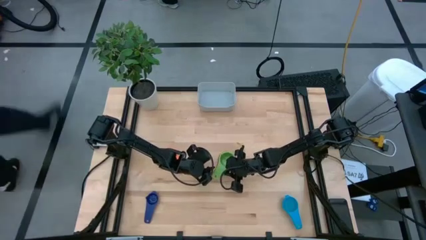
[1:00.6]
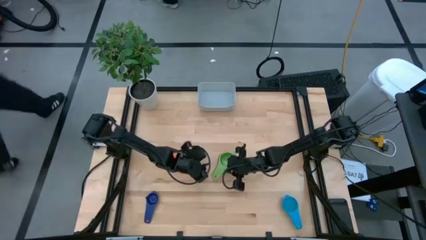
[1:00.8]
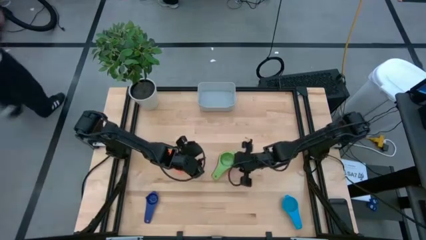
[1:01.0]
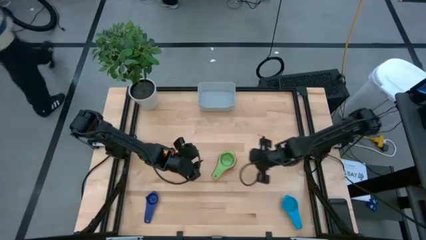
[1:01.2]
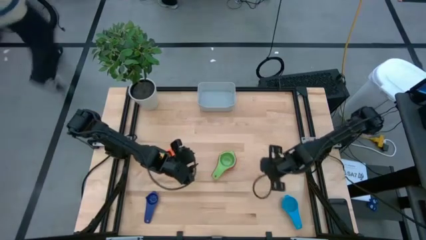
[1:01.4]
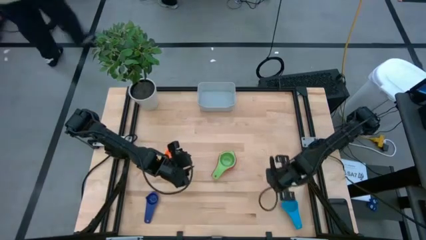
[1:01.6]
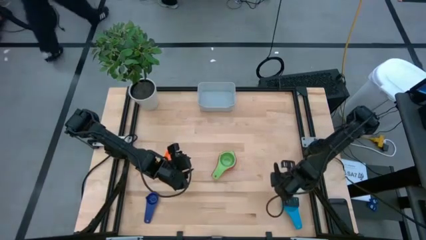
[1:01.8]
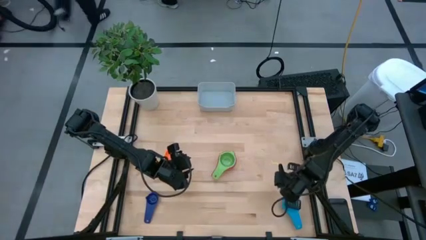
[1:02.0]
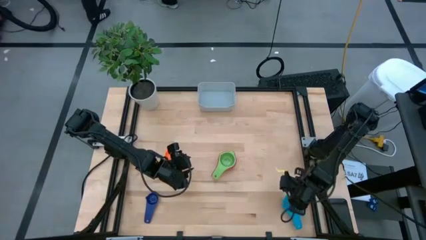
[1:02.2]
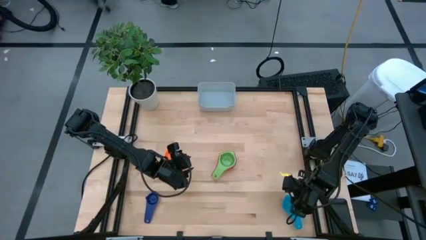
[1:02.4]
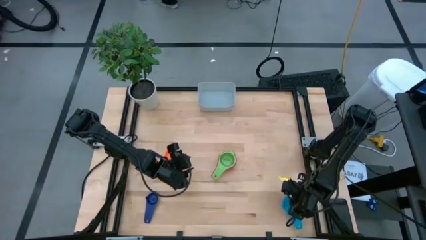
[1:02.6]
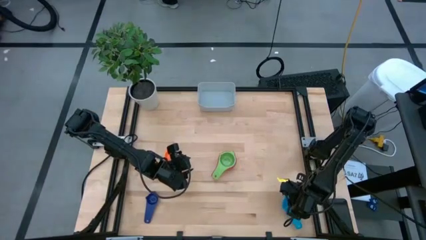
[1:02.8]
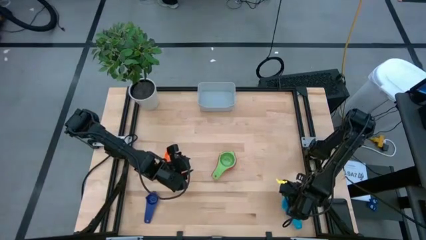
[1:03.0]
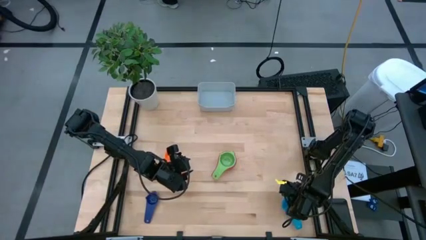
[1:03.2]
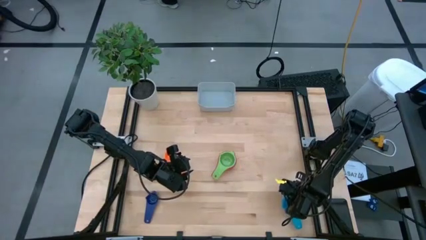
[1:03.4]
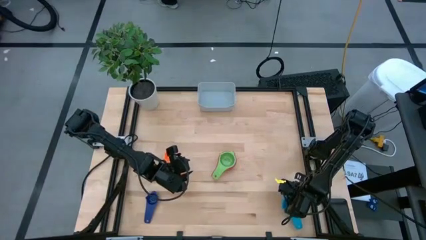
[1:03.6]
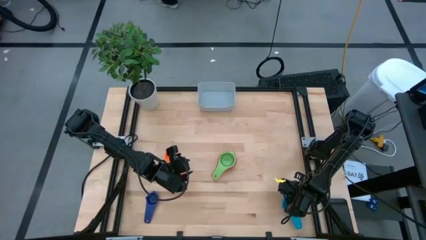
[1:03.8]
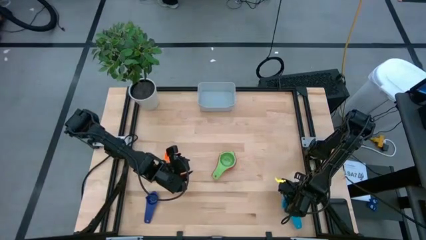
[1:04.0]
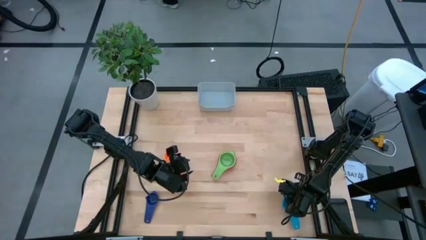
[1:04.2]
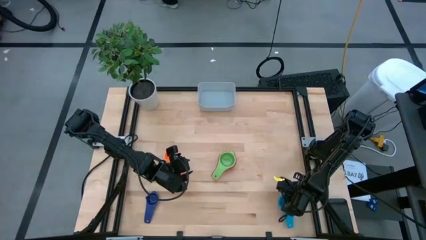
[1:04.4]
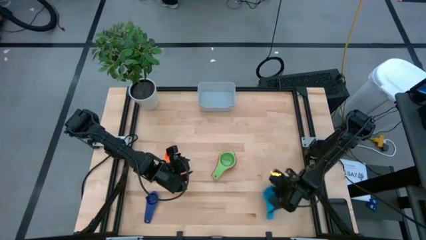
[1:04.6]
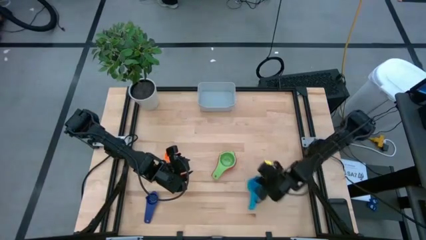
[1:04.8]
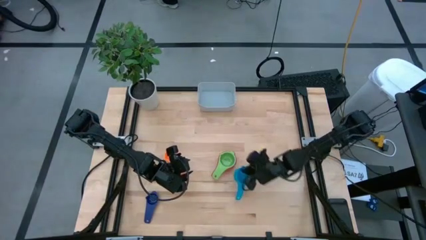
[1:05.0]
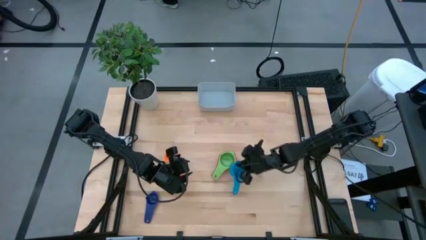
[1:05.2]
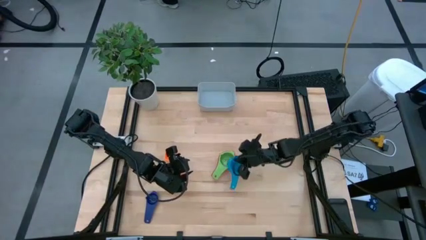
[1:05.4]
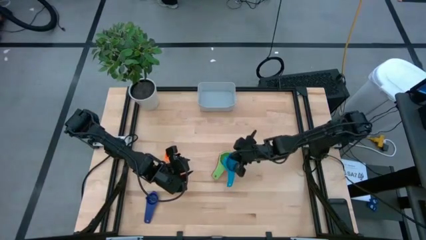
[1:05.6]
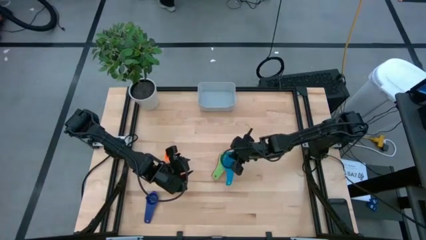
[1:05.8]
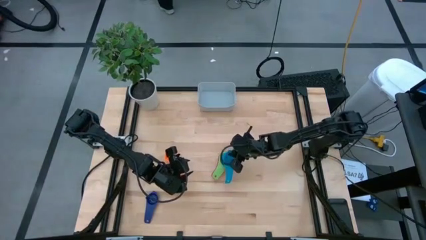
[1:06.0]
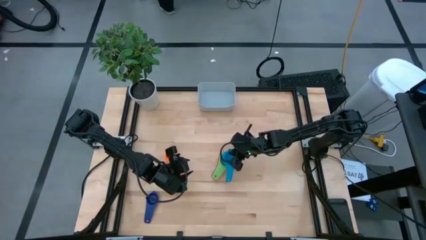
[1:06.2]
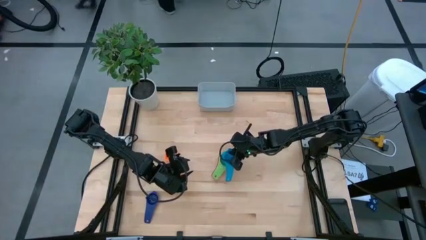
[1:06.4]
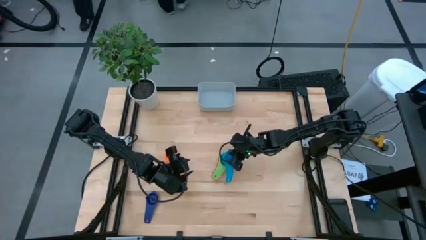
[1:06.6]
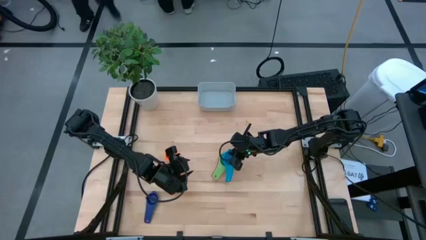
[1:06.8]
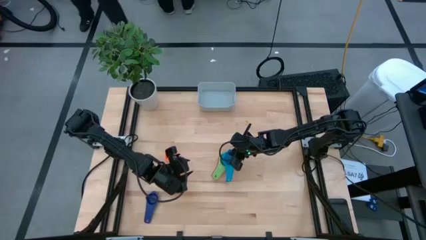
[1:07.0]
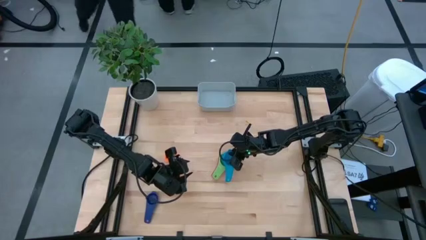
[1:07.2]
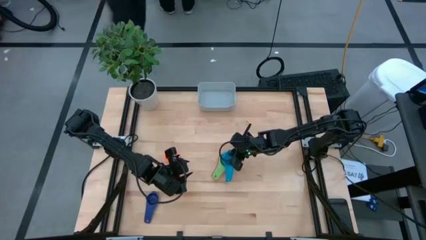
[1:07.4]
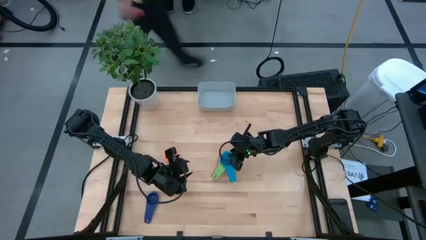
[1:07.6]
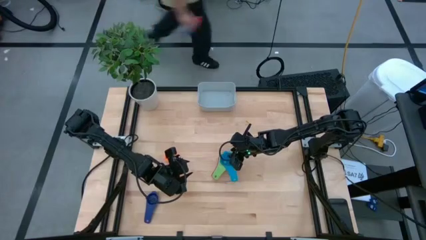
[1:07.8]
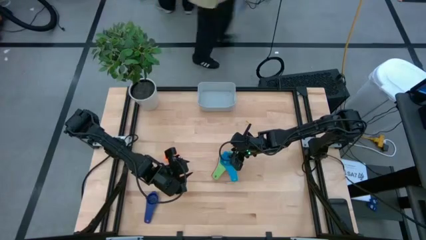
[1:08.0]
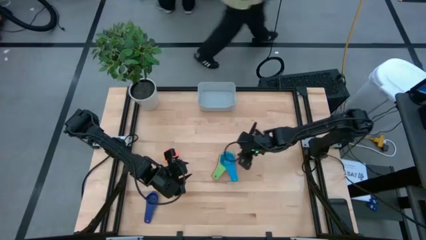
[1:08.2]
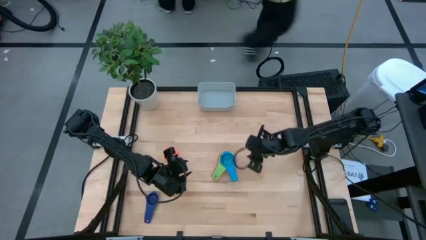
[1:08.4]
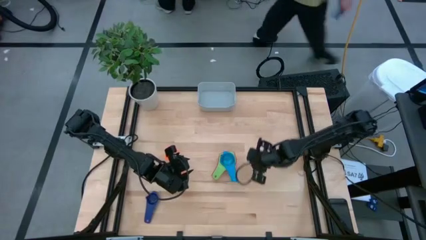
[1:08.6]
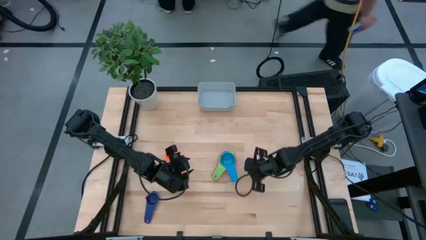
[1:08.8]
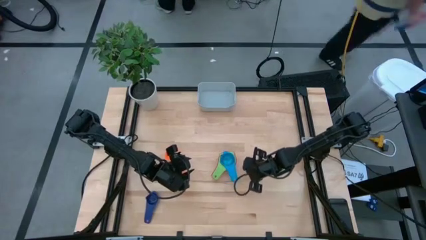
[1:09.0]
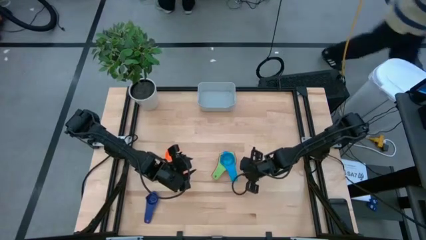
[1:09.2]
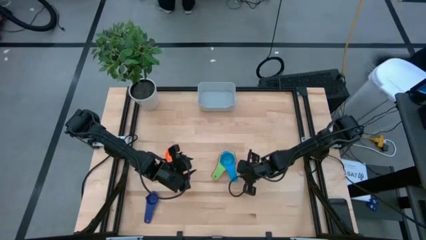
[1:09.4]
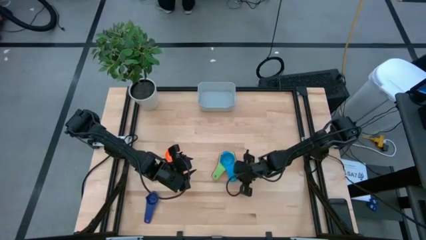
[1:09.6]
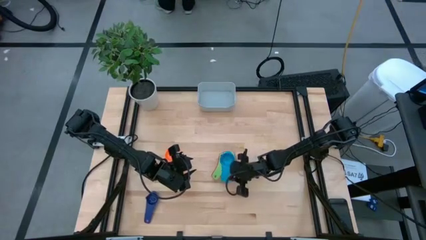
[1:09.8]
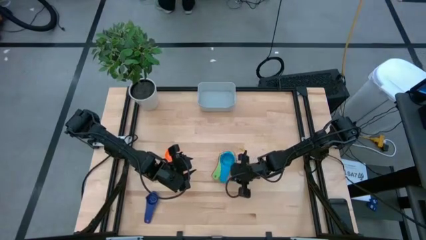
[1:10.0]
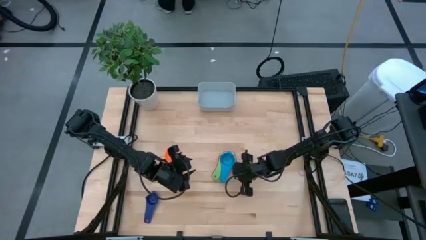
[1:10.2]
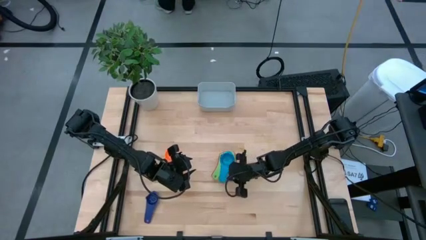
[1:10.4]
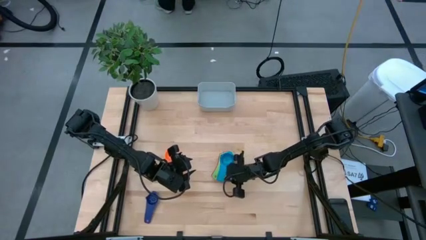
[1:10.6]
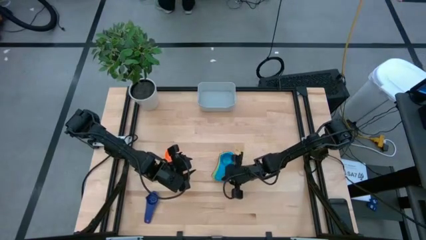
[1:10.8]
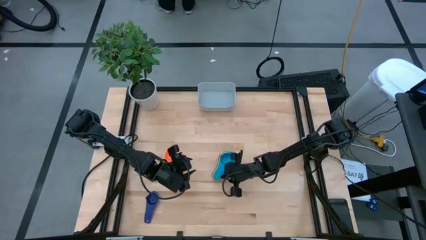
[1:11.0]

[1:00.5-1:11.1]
Task: Nest measuring cups in basket
Stack the light blue measuring cup on top of the green measuring cup

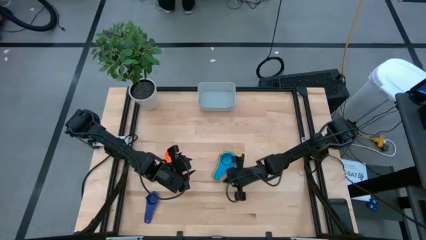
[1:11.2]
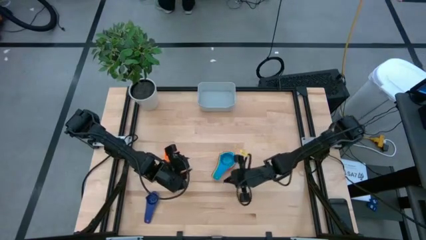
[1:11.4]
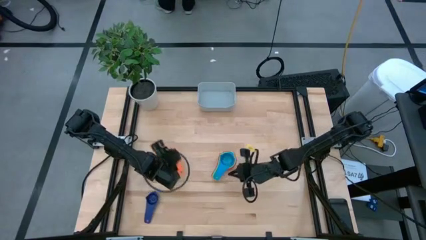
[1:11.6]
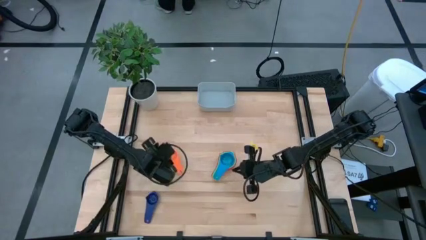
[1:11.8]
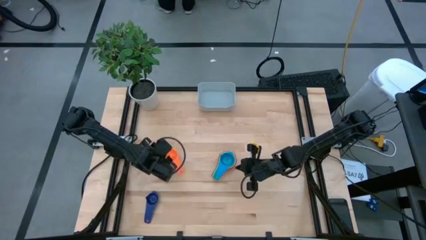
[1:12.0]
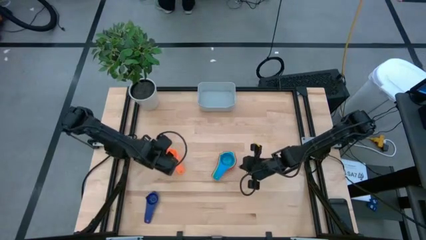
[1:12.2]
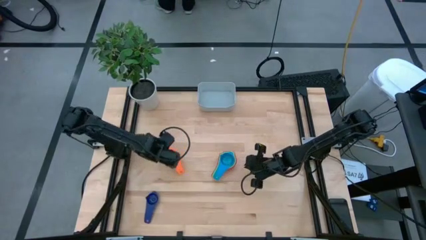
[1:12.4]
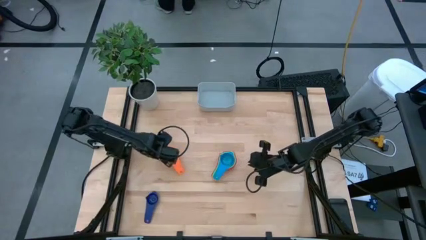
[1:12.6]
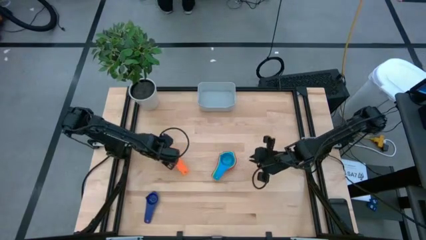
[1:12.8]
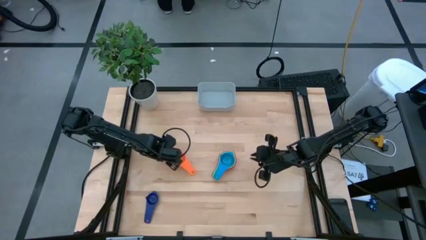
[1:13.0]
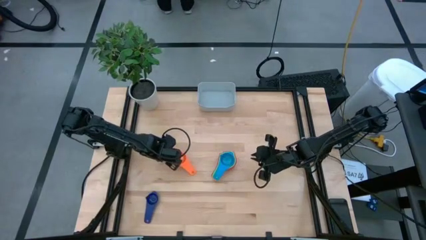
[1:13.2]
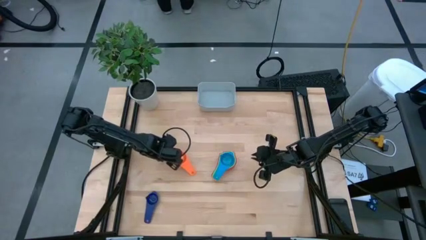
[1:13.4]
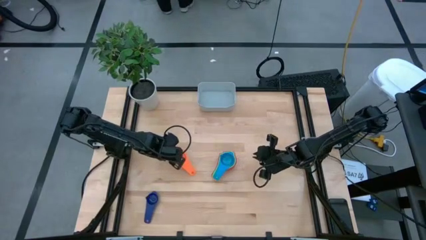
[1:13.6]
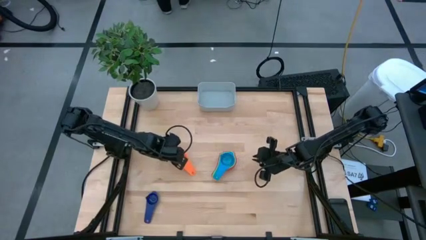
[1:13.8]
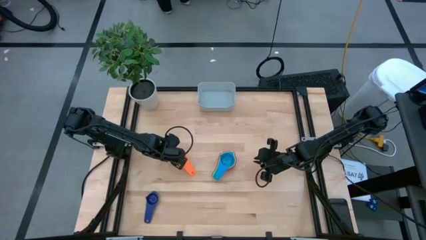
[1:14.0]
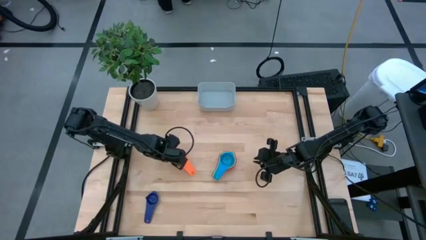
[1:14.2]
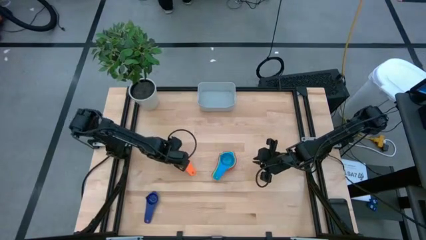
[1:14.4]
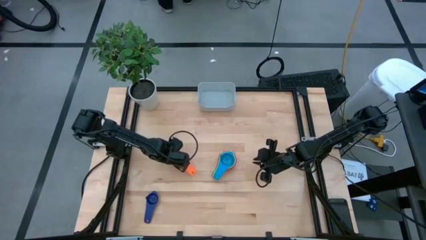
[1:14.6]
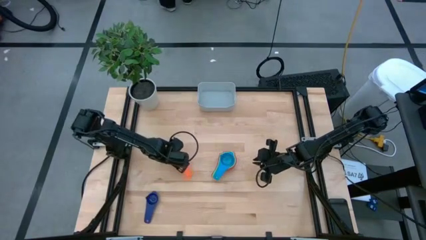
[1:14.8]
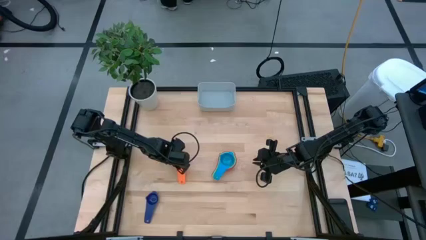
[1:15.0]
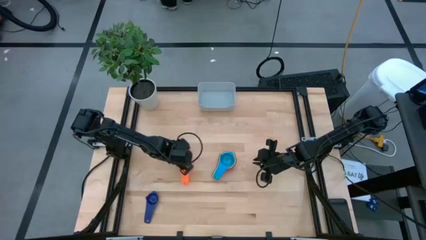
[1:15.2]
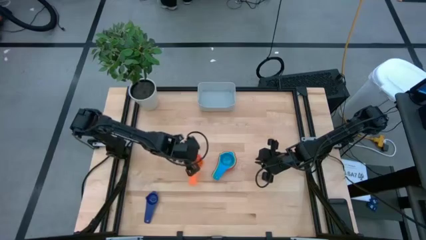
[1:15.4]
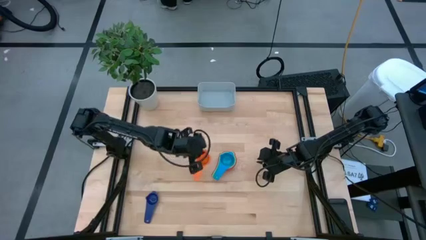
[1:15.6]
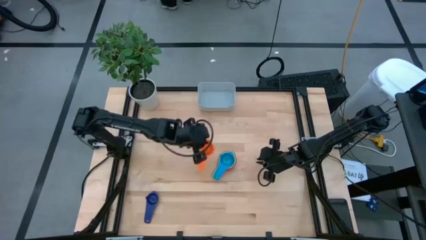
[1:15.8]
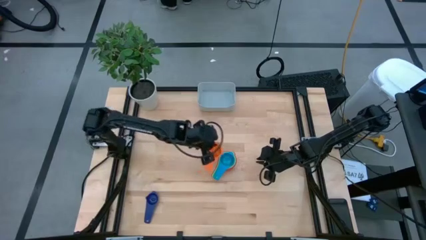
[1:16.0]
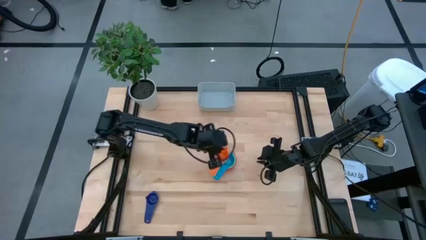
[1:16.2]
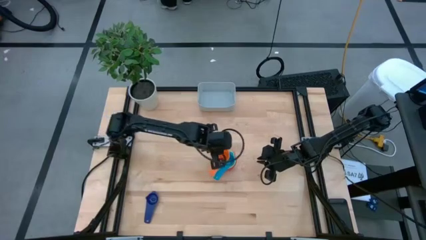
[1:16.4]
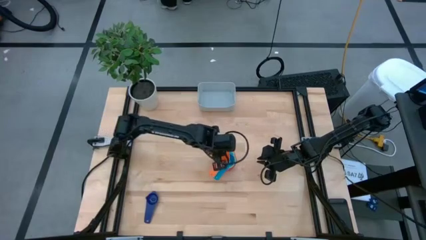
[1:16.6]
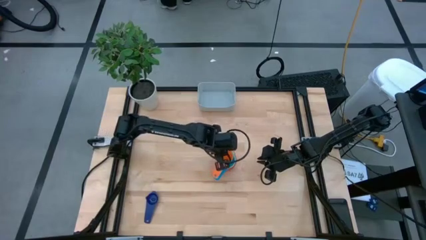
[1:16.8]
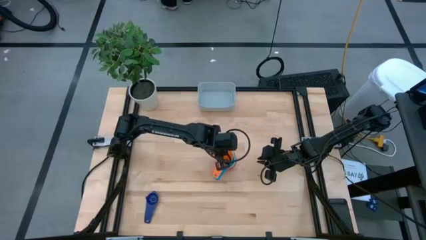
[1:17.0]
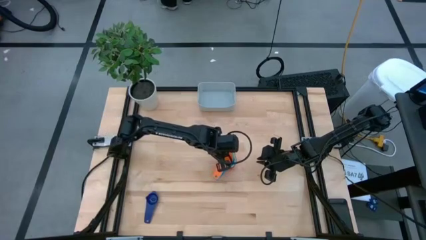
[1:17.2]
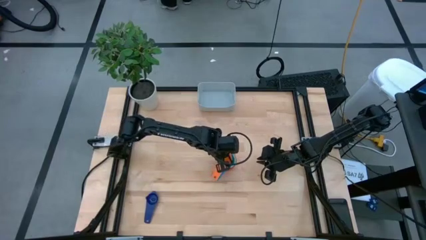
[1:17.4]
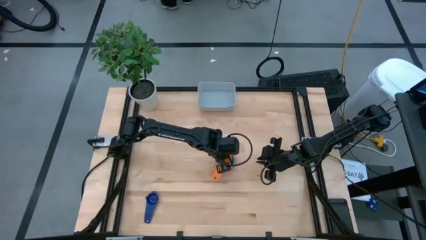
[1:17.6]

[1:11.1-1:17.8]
Stack the orange measuring cup on top of the light blue measuring cup
